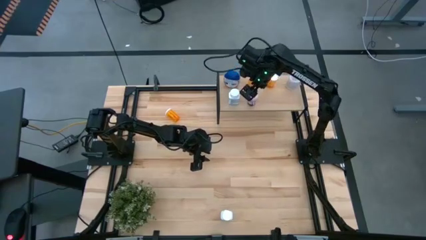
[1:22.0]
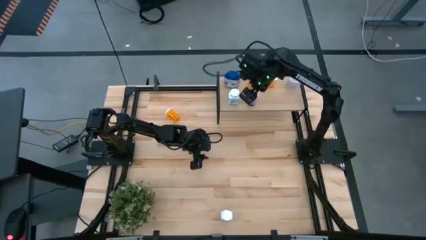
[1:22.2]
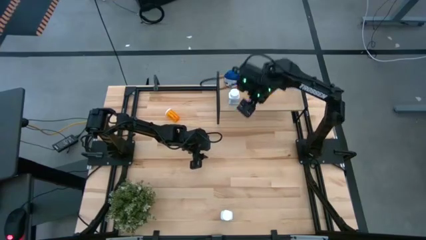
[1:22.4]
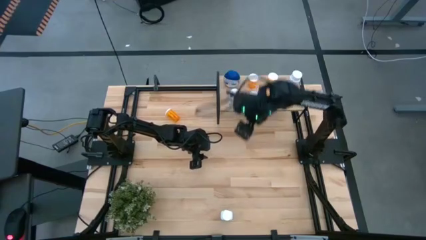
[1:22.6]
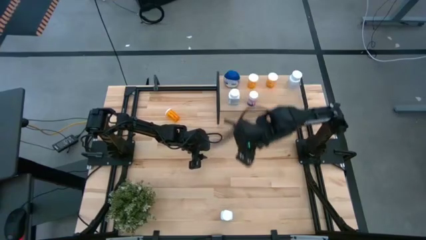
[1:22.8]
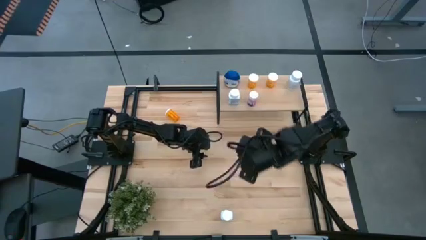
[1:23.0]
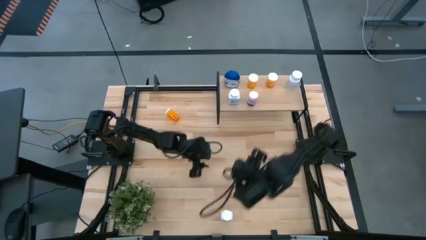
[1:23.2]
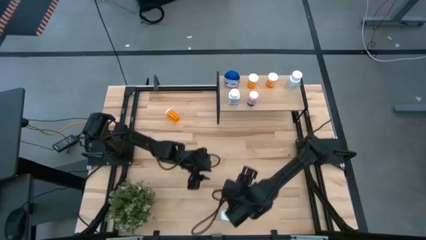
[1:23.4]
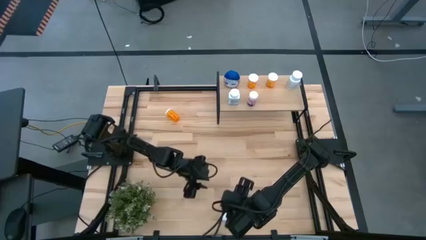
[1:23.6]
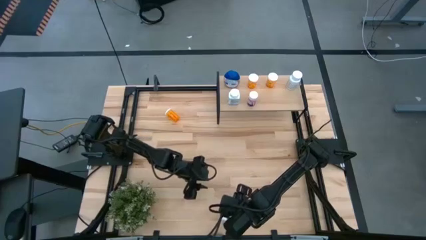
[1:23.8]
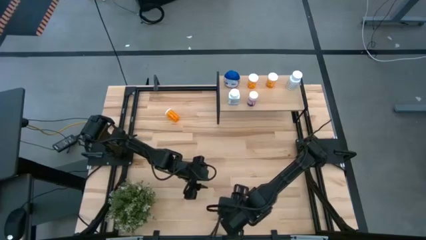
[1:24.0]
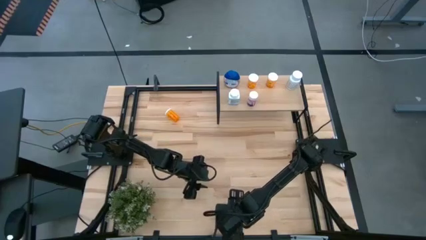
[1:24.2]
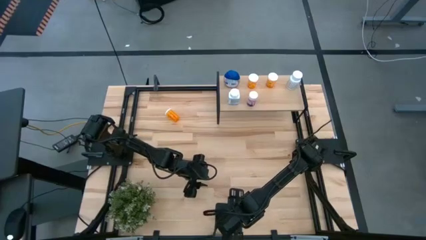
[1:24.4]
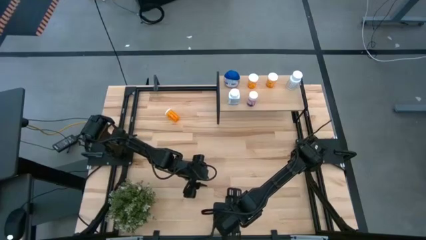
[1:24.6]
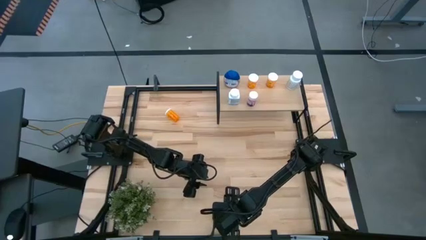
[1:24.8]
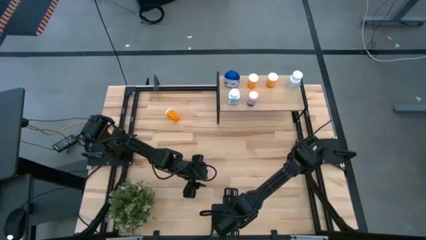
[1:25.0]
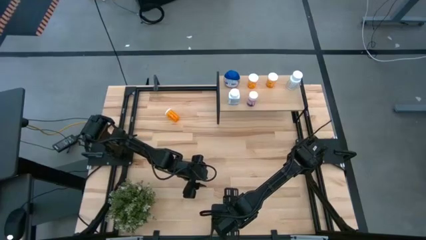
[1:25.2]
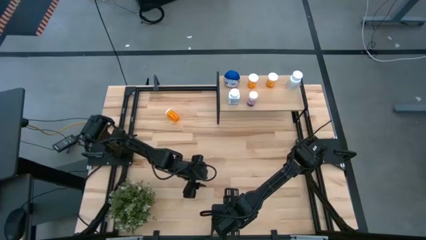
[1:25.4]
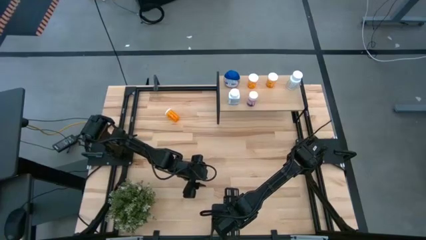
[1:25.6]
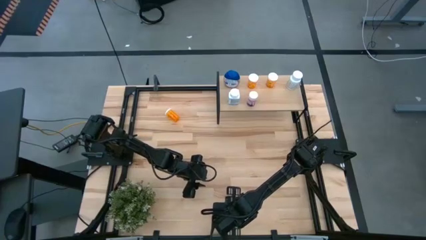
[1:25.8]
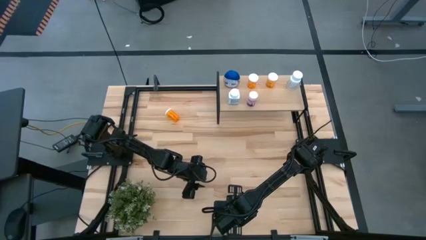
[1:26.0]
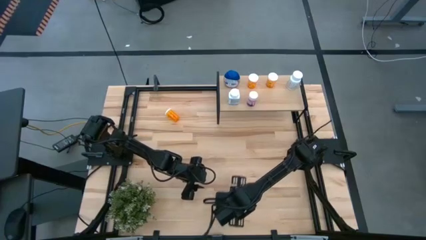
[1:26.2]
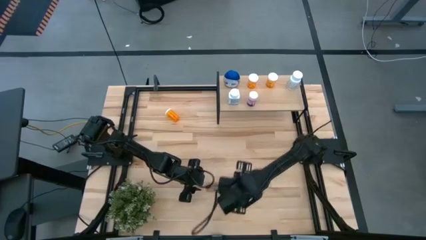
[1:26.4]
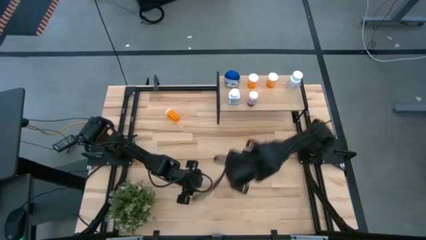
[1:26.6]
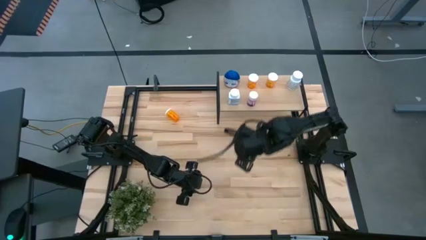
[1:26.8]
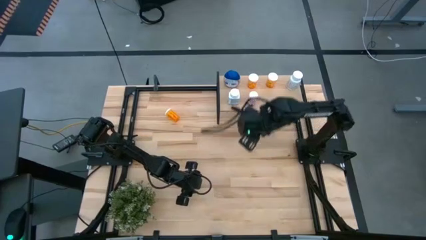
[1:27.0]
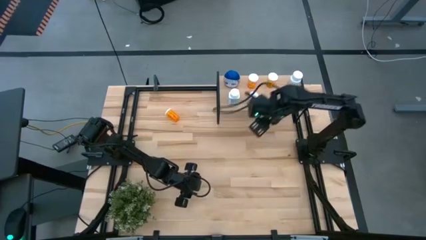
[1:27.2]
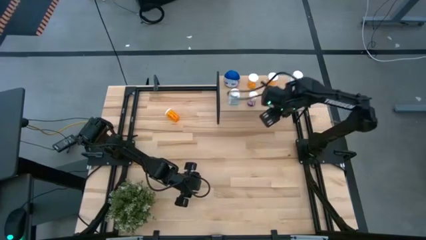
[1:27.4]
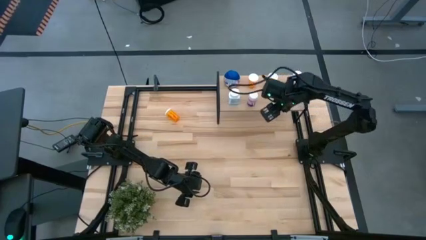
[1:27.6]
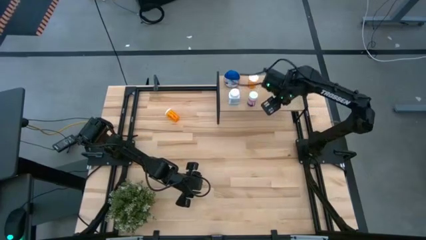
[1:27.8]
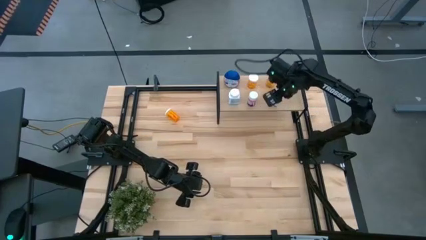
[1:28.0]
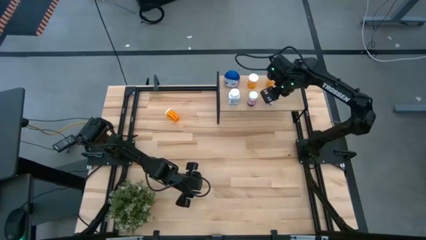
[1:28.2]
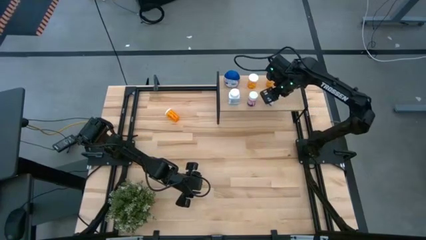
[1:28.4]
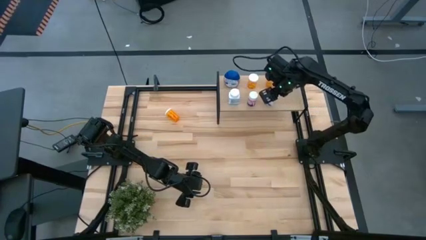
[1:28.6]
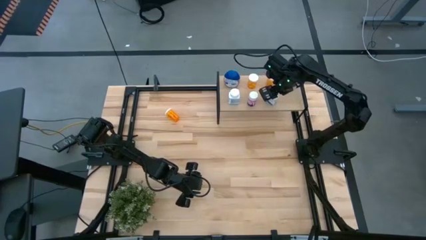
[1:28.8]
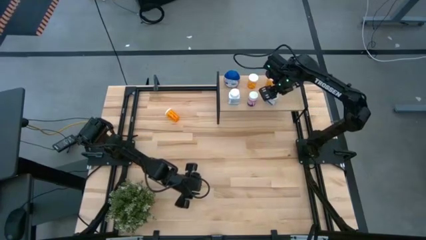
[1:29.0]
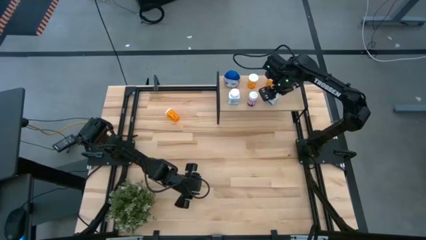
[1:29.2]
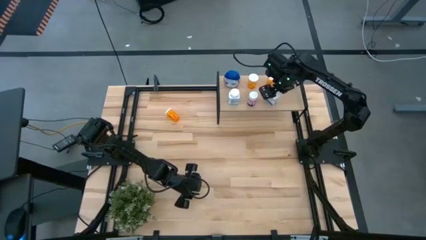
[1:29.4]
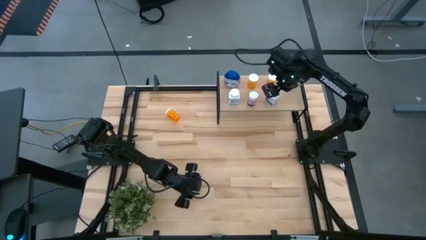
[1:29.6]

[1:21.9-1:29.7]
Task: Pick and place medicine bottles onto shelf by color
Put the white blue pill bottle on the shelf

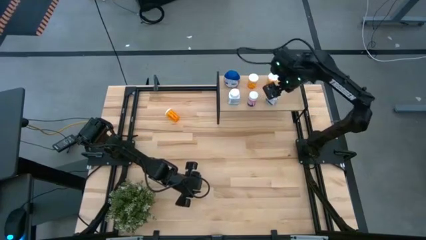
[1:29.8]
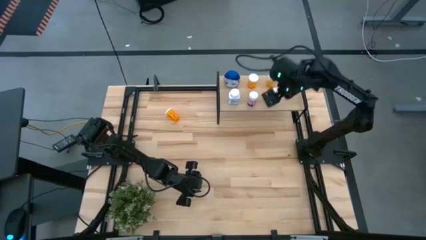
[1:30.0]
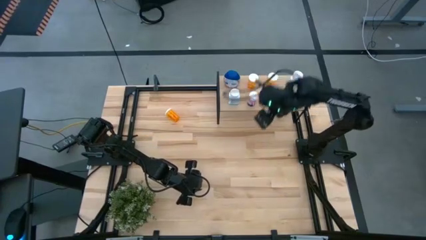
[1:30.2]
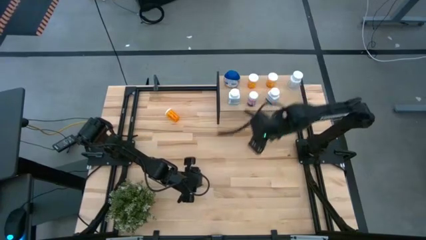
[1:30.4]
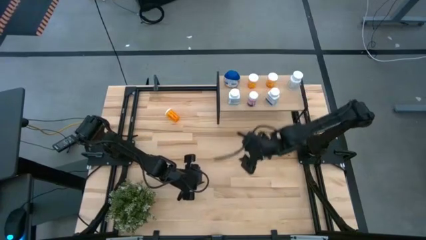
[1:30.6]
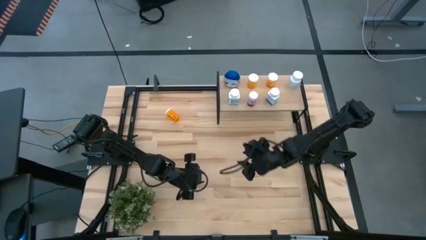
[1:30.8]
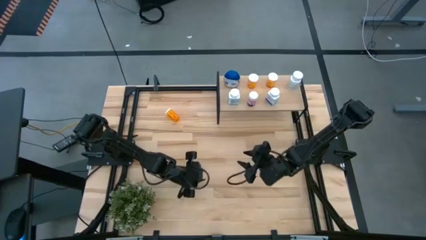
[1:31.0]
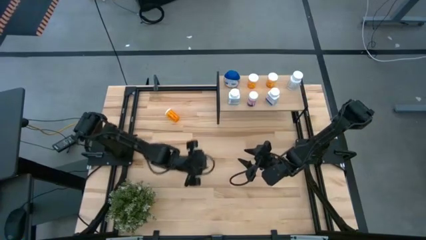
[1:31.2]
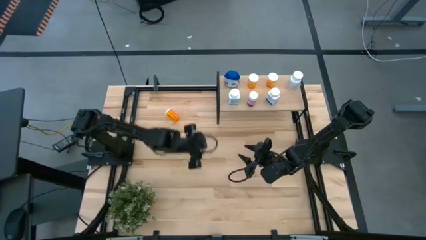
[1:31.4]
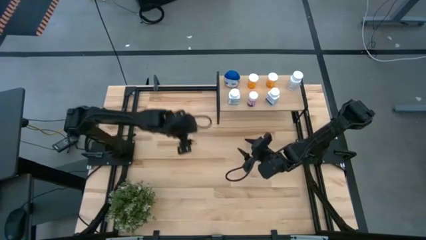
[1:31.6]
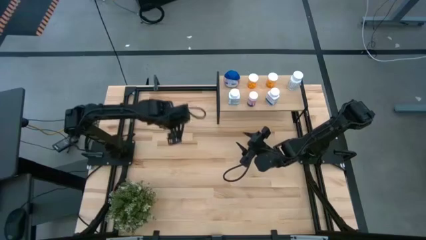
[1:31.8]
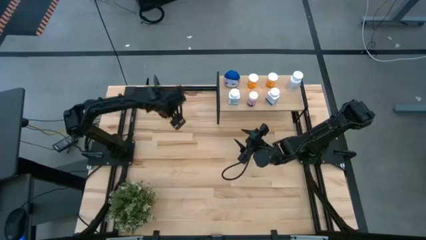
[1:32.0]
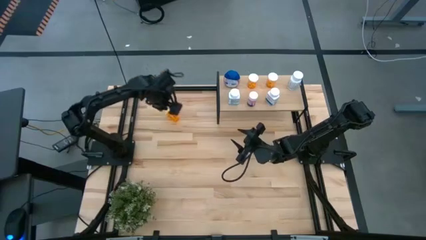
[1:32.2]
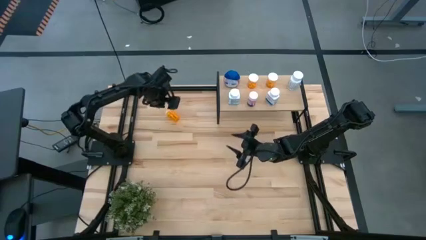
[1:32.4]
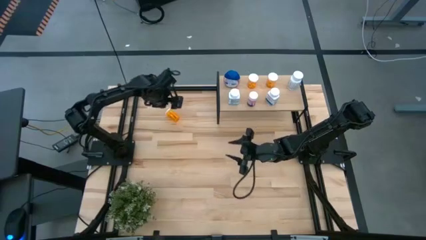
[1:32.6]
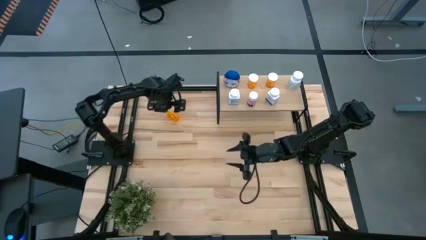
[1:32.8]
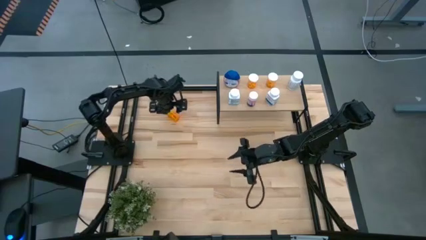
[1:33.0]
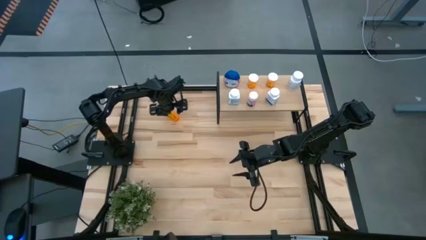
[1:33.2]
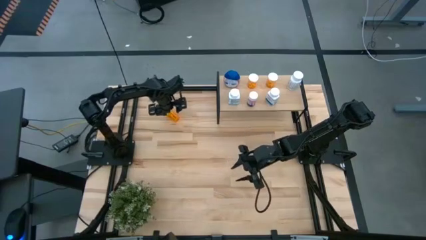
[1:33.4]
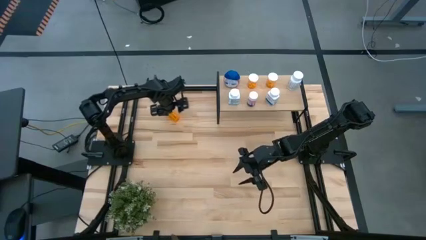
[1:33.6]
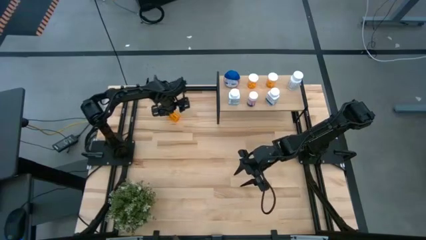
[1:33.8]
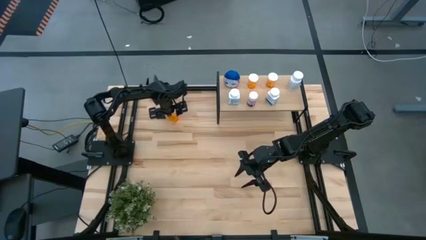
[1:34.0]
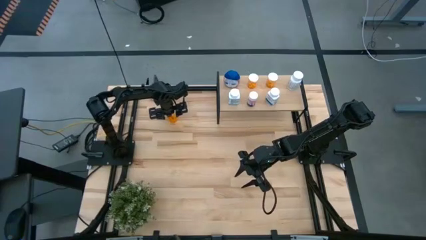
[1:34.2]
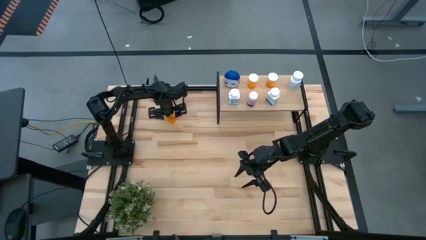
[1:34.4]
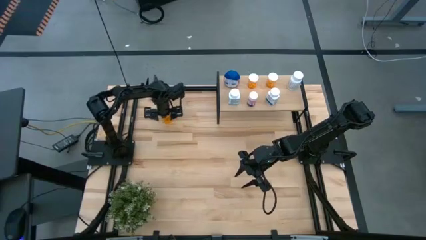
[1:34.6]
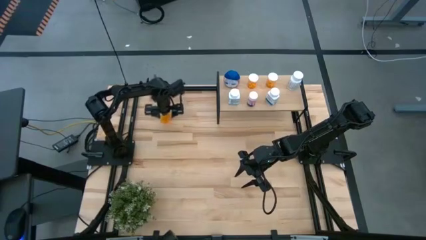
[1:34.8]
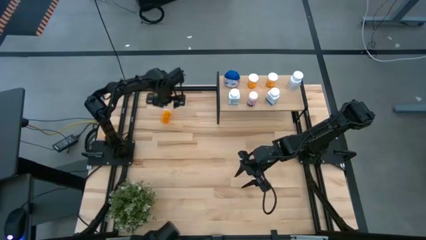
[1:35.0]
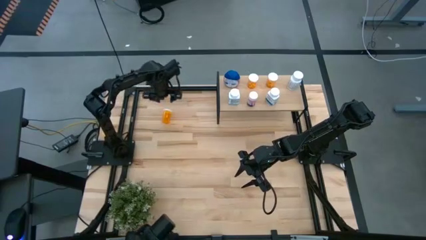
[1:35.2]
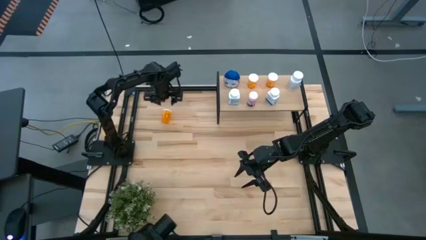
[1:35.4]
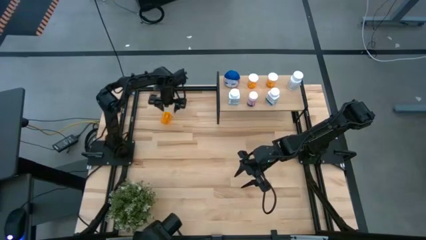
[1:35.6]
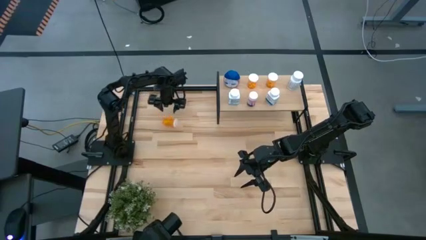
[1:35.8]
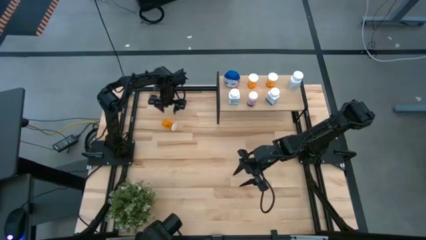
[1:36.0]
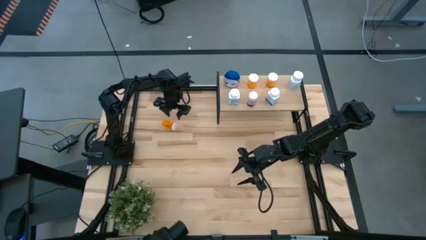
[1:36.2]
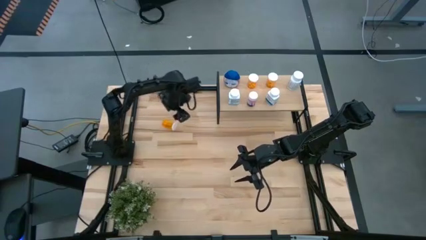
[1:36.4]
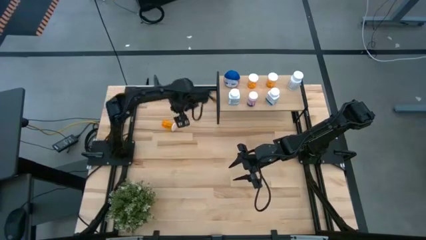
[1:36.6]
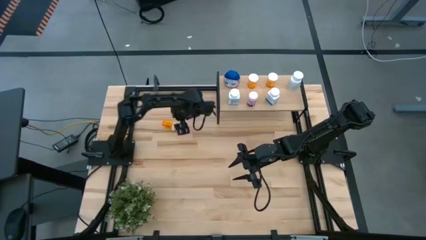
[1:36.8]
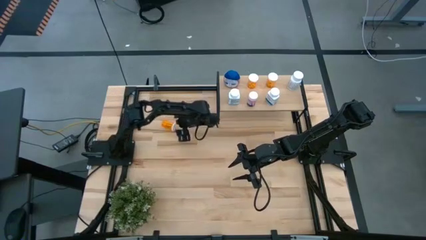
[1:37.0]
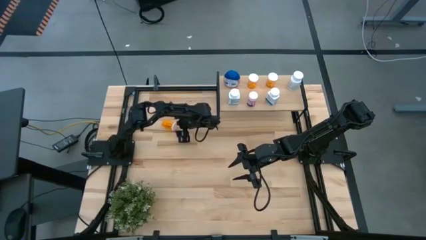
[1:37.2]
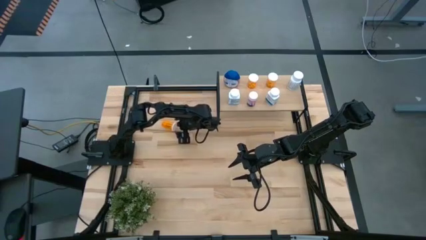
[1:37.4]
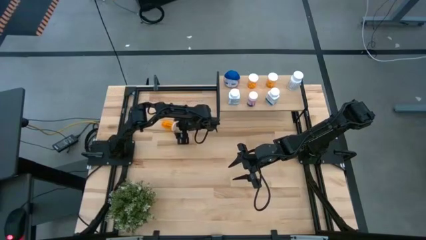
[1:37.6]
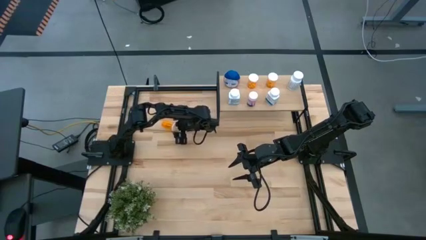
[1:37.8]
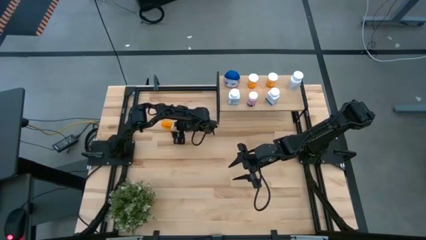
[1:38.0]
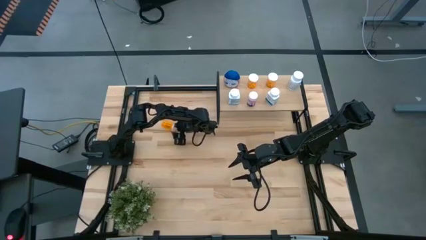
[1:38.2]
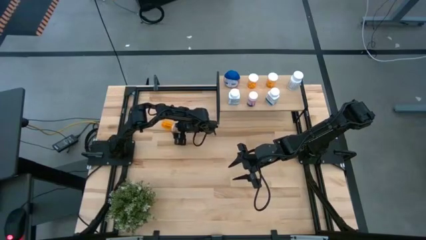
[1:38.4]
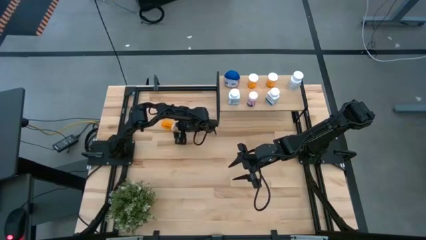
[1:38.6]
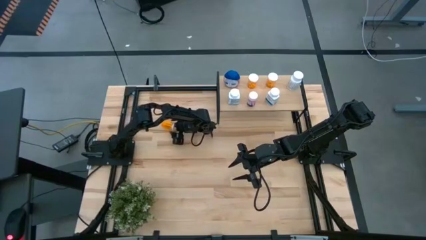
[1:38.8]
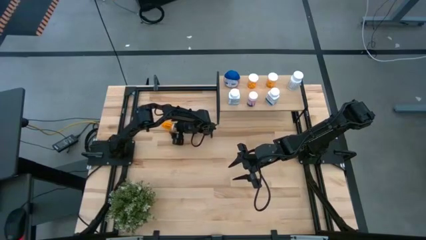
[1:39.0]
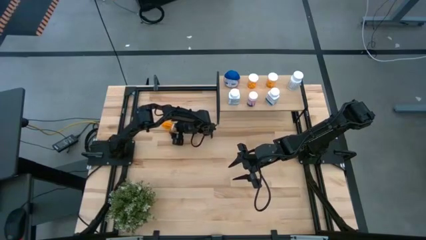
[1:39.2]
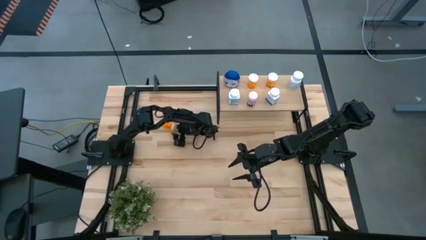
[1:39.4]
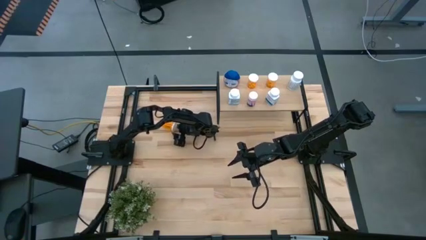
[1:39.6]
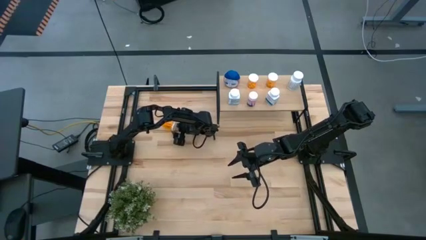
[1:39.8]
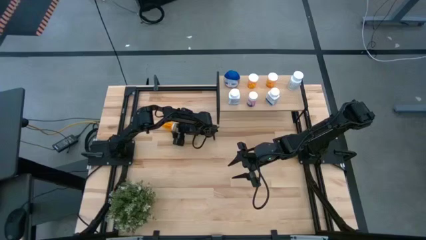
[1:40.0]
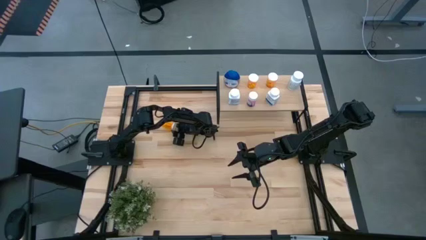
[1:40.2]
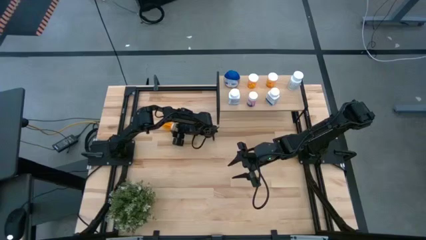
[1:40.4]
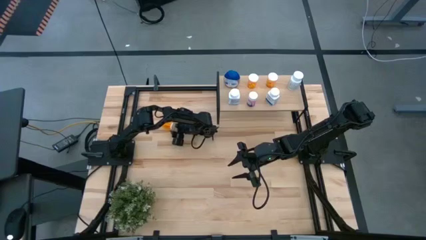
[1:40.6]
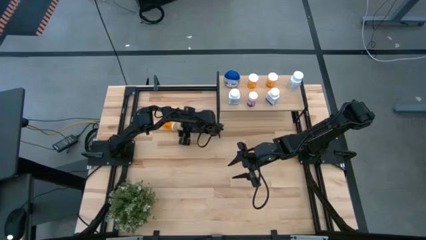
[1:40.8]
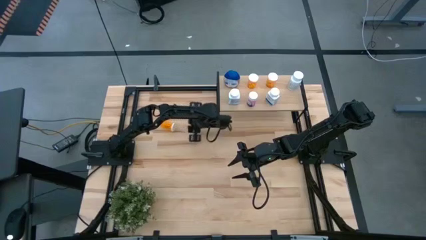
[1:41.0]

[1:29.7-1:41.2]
Put the orange pill bottle on the shelf
